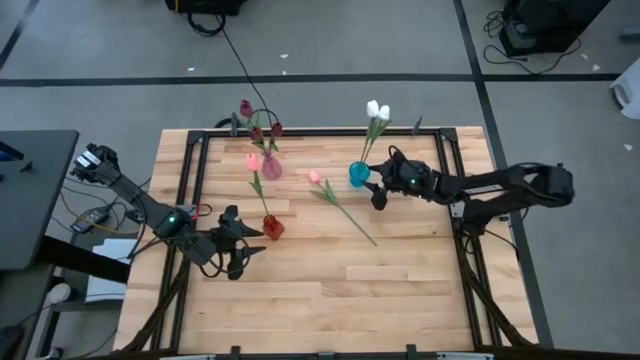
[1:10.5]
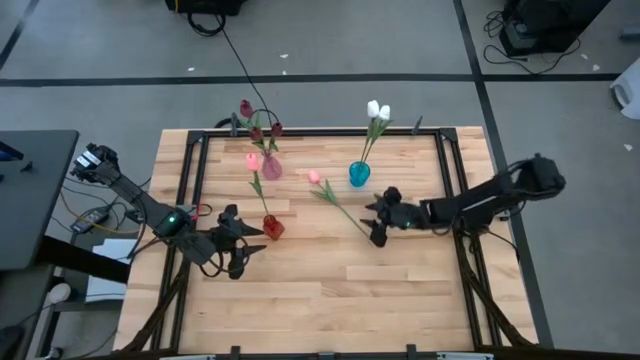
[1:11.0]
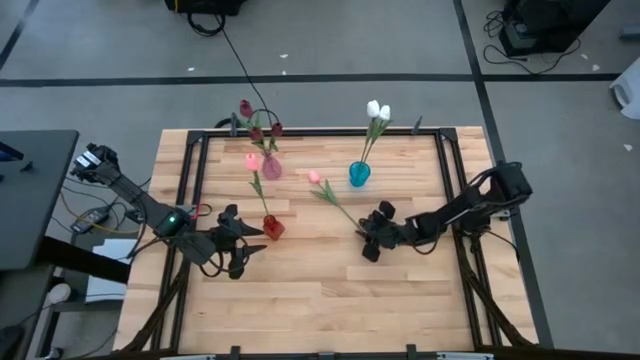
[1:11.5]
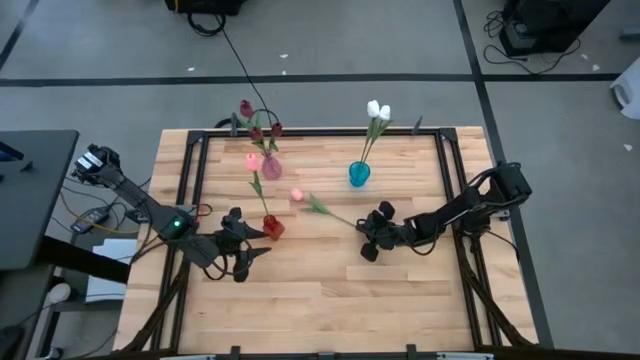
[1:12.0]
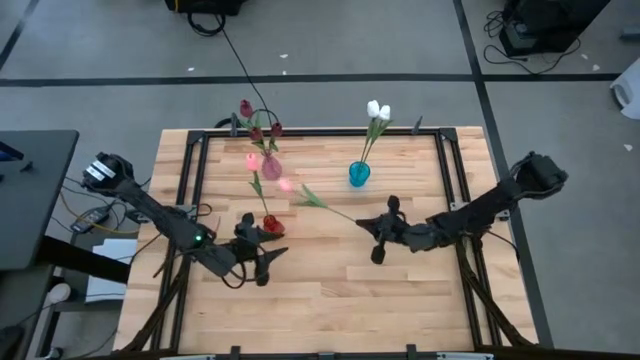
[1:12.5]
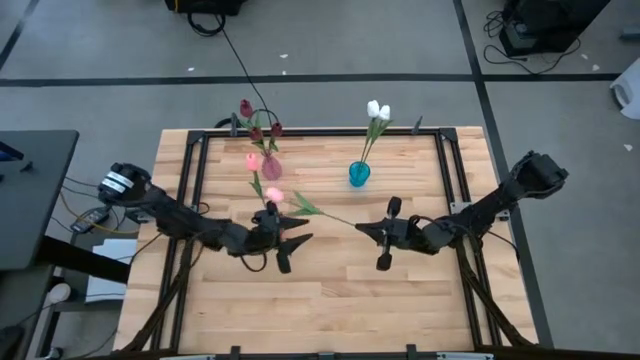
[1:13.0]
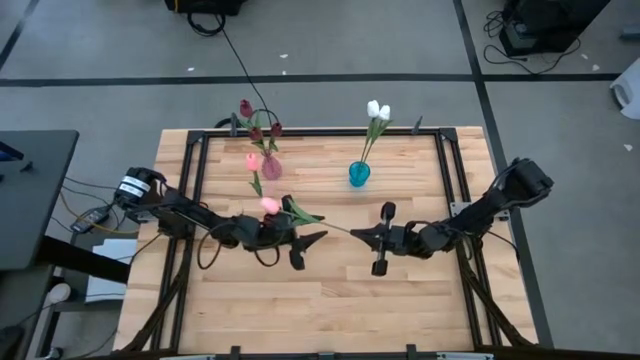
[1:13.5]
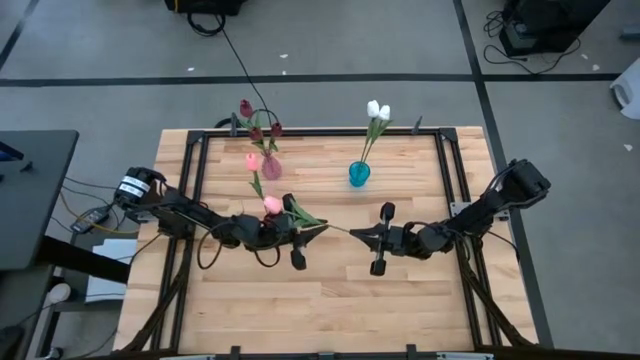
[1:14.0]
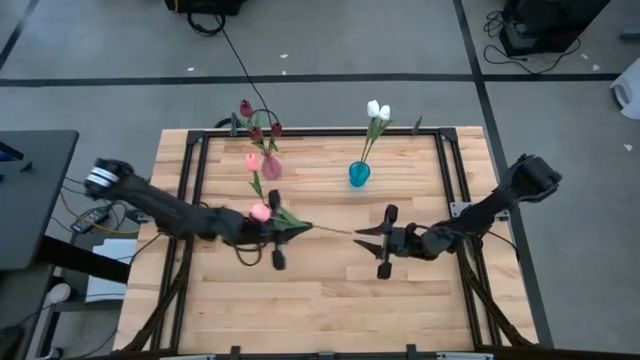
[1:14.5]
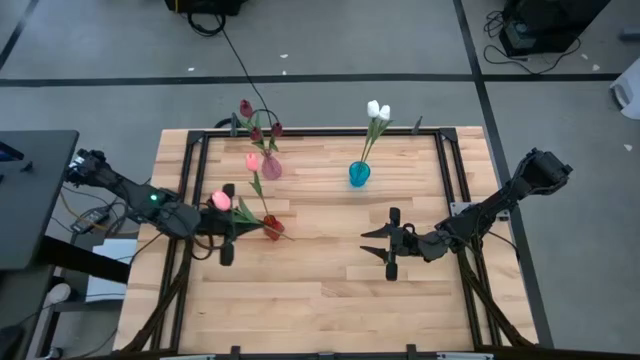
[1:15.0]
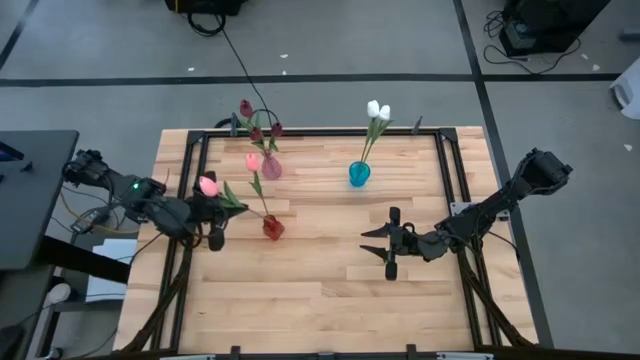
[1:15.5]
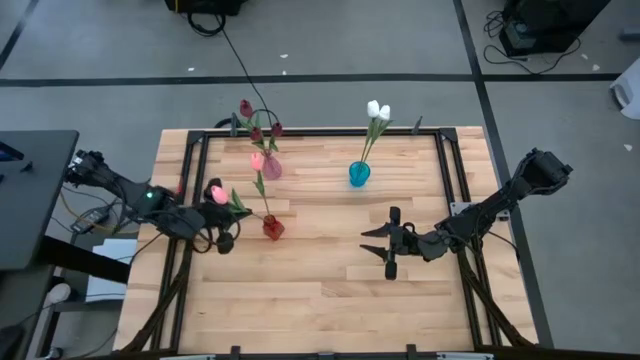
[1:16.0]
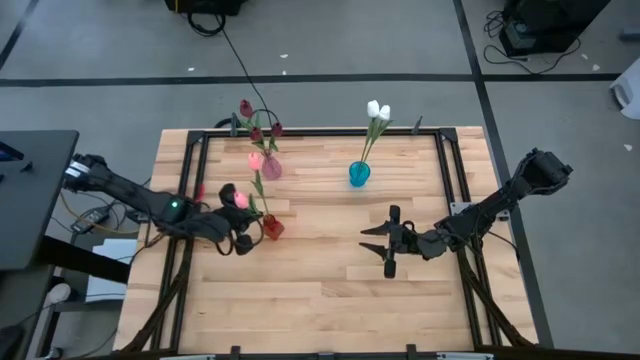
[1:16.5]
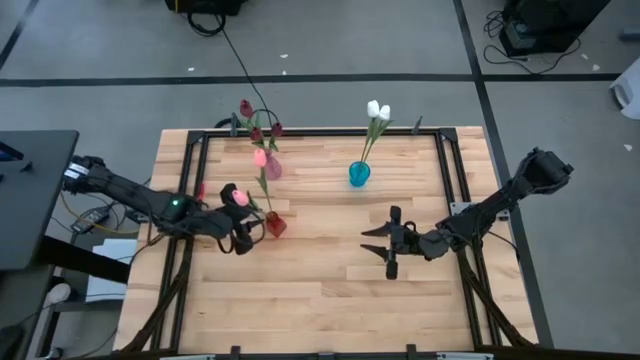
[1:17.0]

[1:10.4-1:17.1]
Task: Sort flowers into vase by color
Put the pink tulip into the red vase

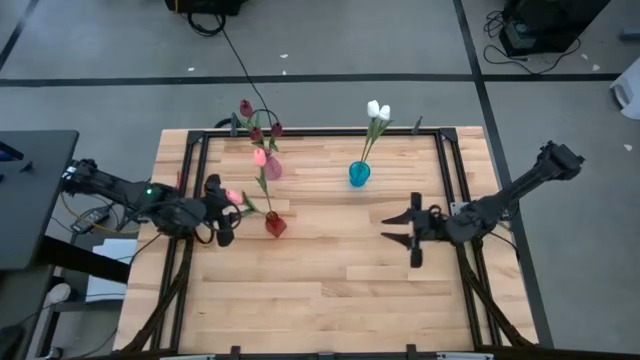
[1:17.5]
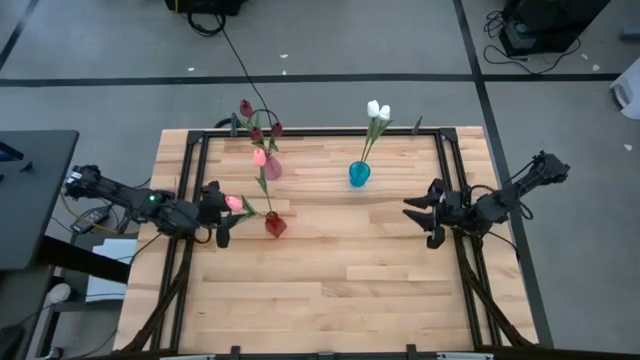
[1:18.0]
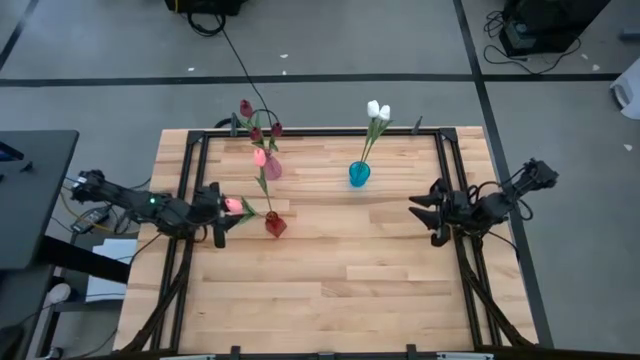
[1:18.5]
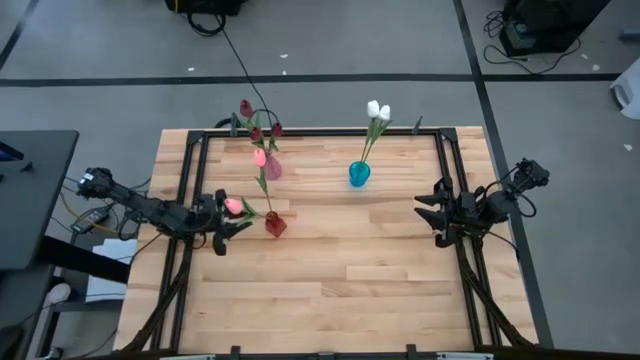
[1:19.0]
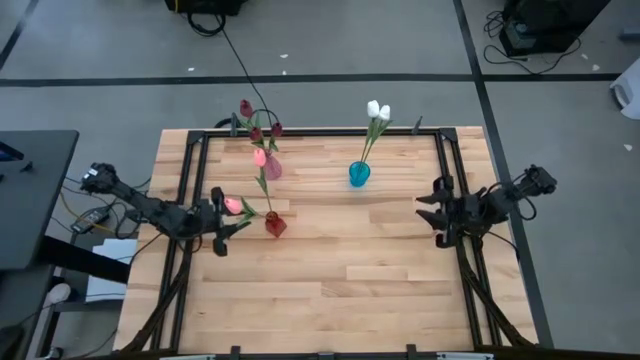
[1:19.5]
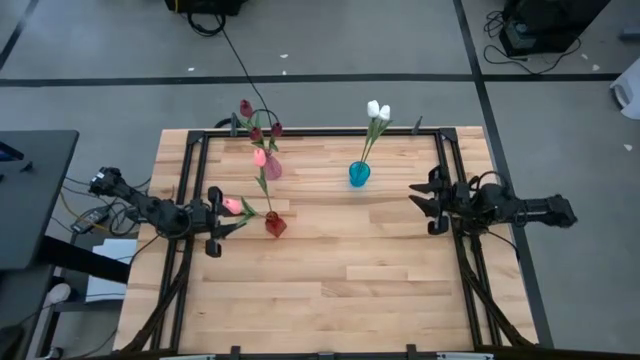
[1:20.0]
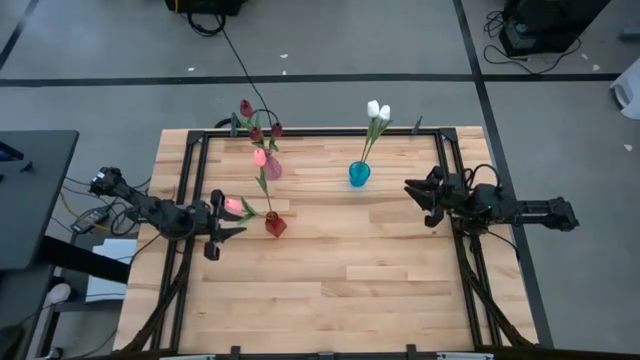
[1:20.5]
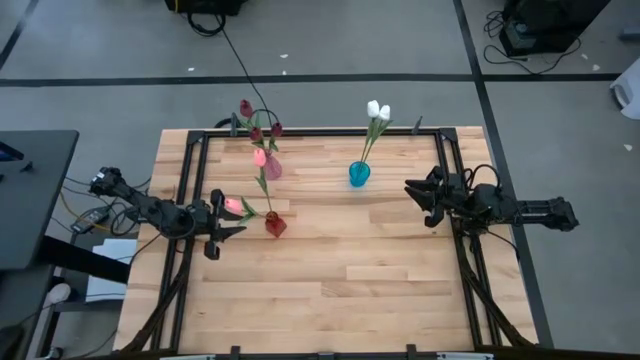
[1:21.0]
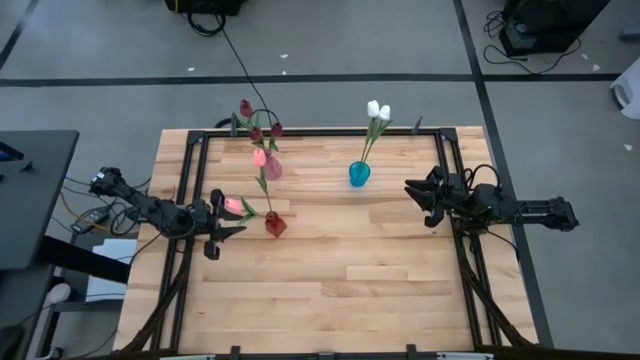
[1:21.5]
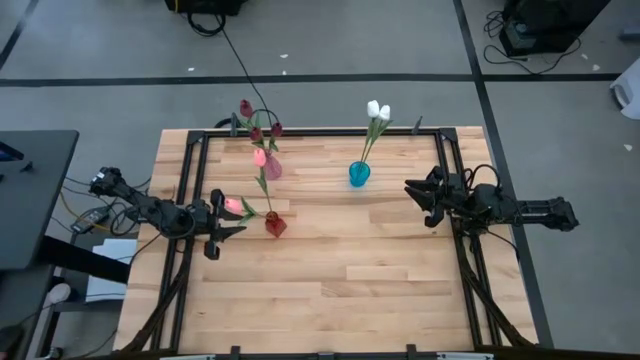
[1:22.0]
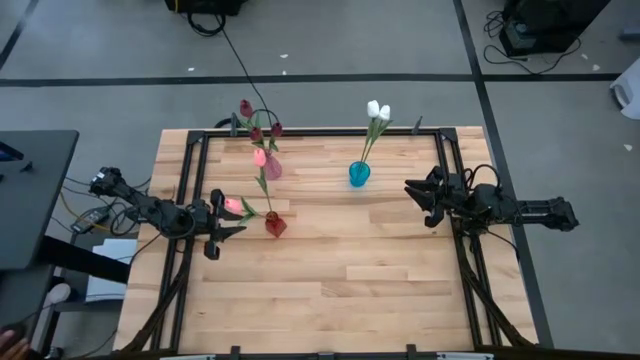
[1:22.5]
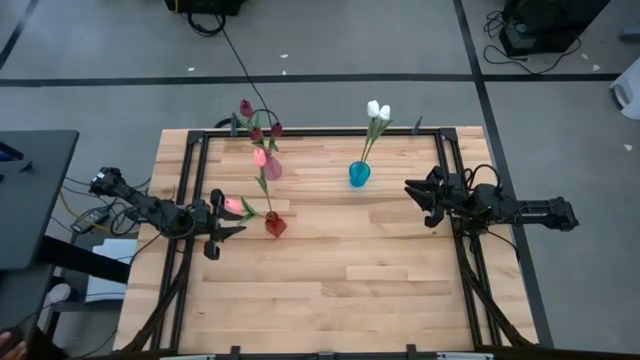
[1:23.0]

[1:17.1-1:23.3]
Return to Home Position

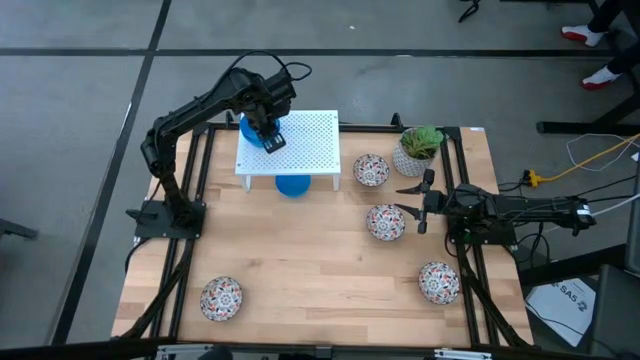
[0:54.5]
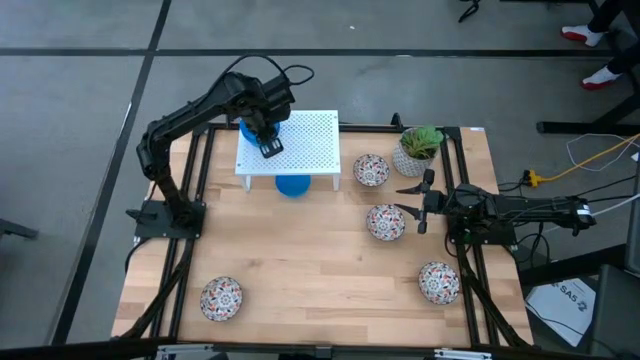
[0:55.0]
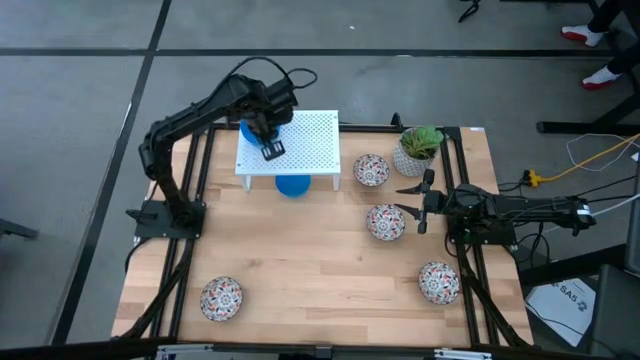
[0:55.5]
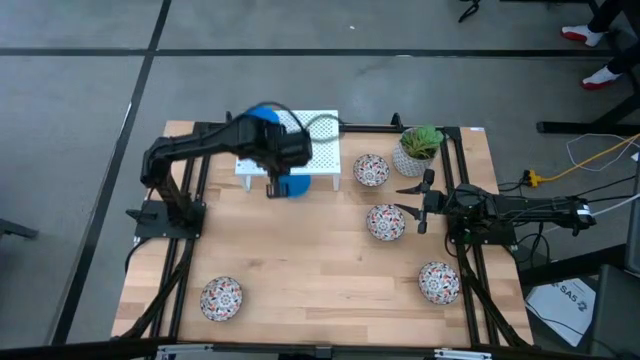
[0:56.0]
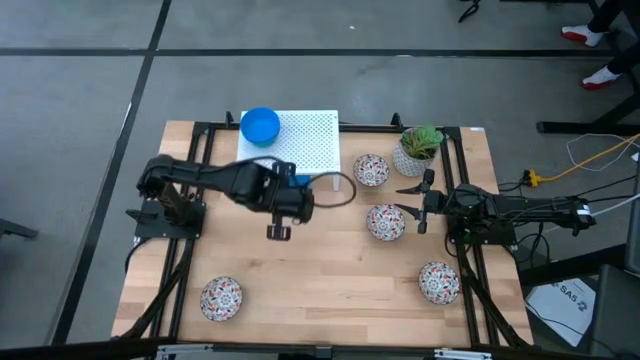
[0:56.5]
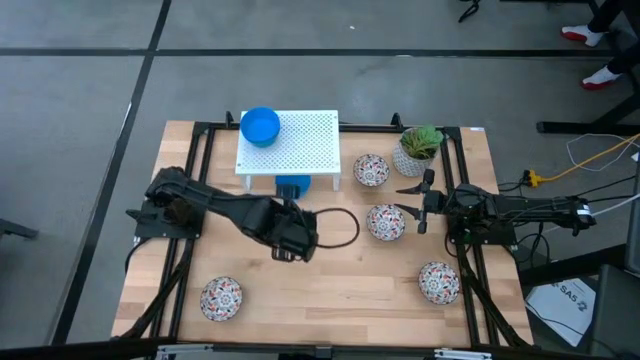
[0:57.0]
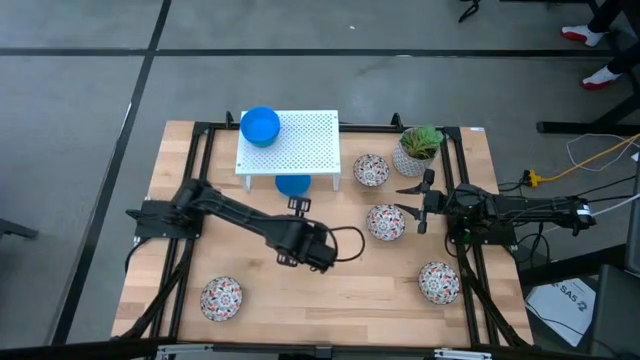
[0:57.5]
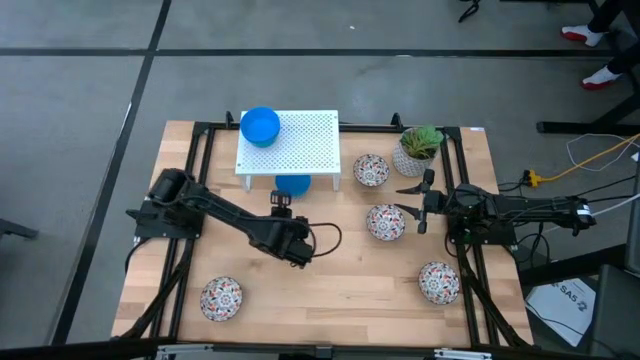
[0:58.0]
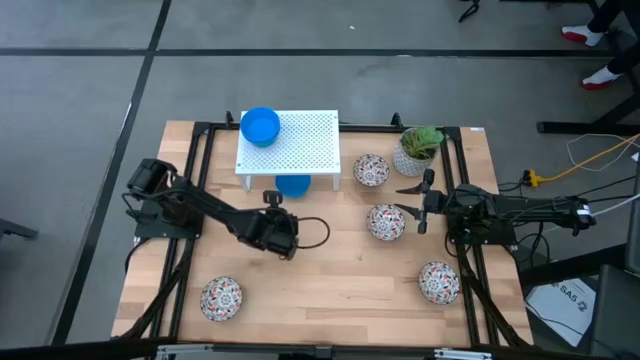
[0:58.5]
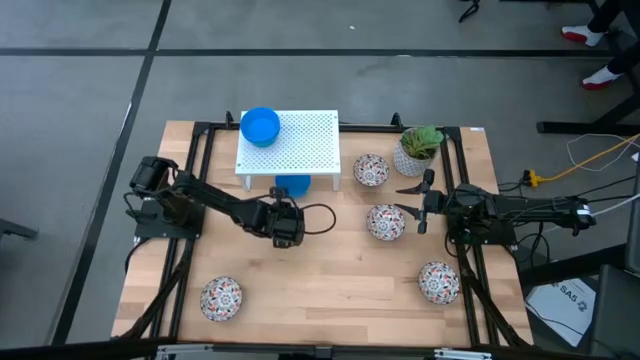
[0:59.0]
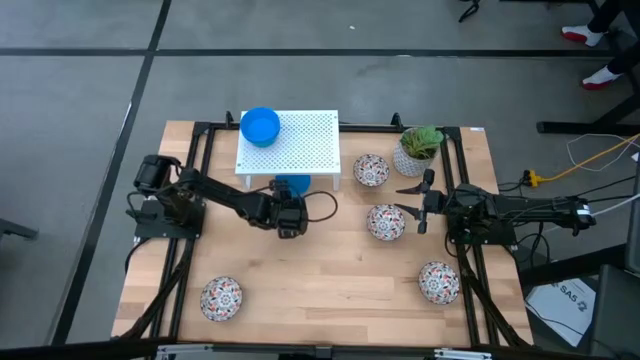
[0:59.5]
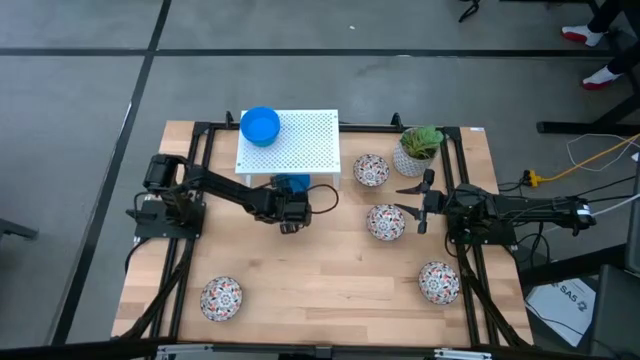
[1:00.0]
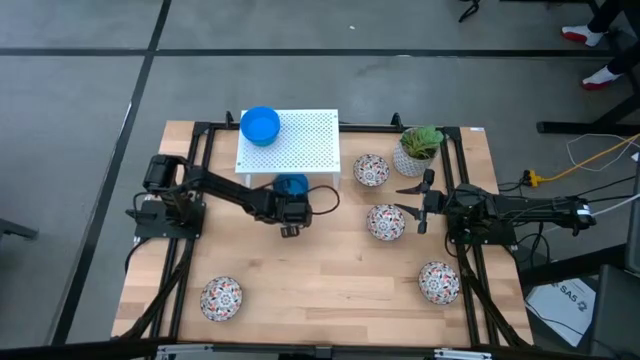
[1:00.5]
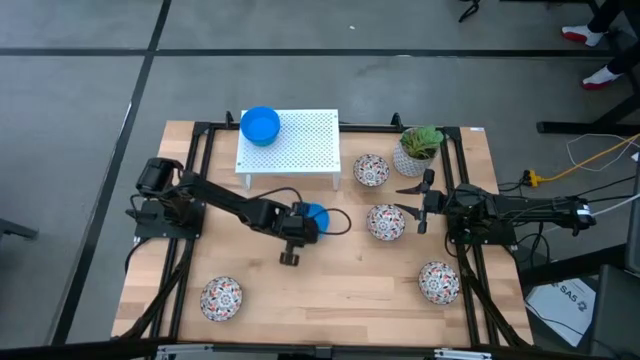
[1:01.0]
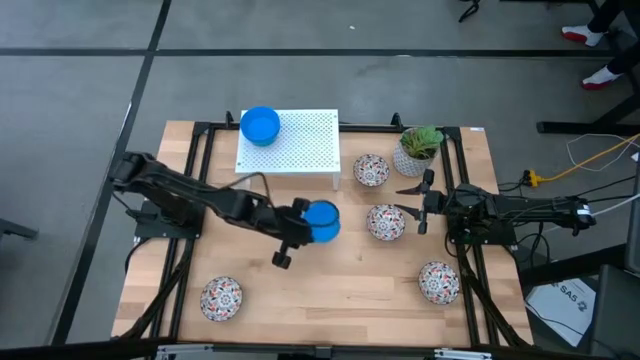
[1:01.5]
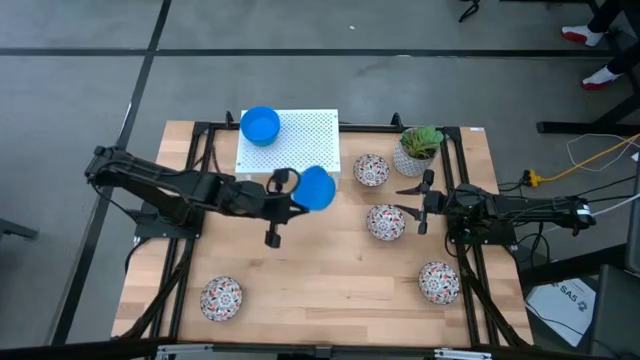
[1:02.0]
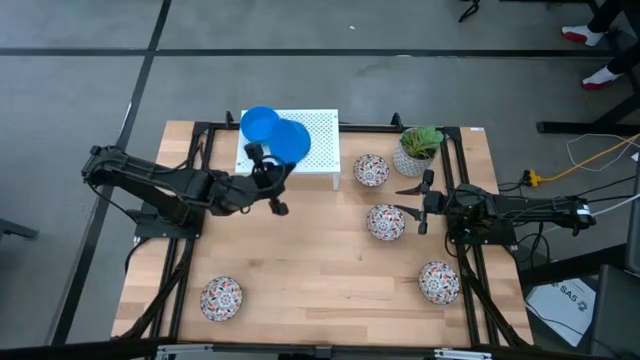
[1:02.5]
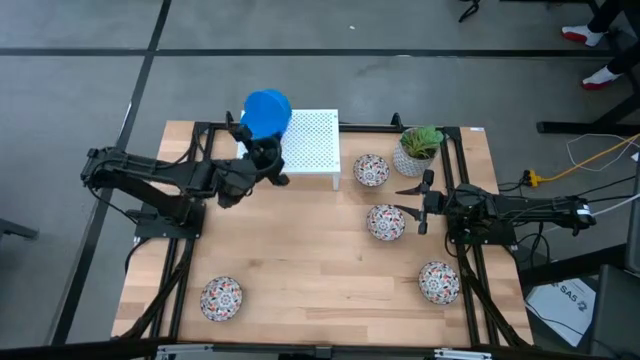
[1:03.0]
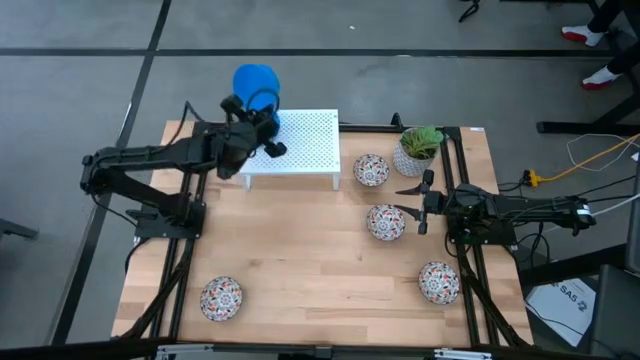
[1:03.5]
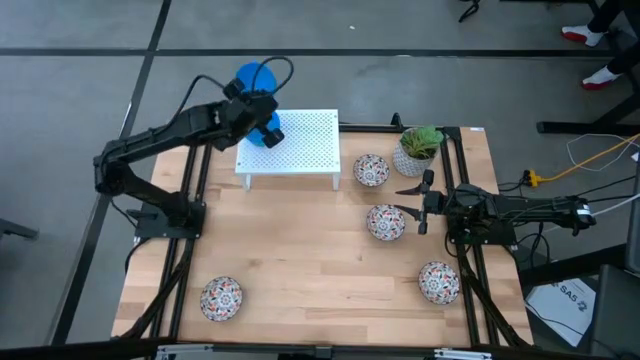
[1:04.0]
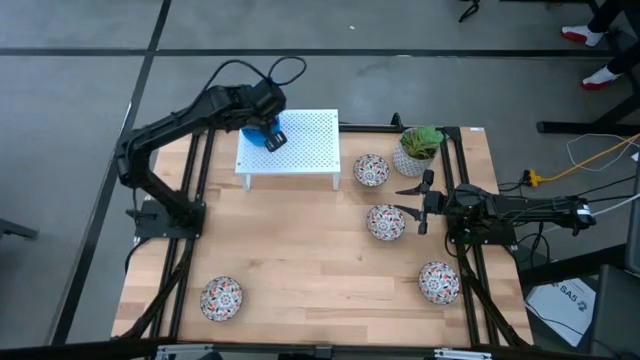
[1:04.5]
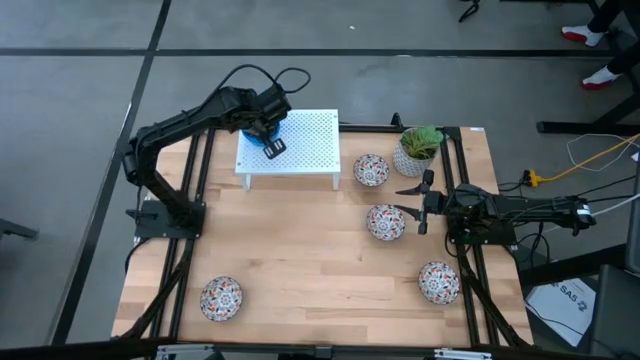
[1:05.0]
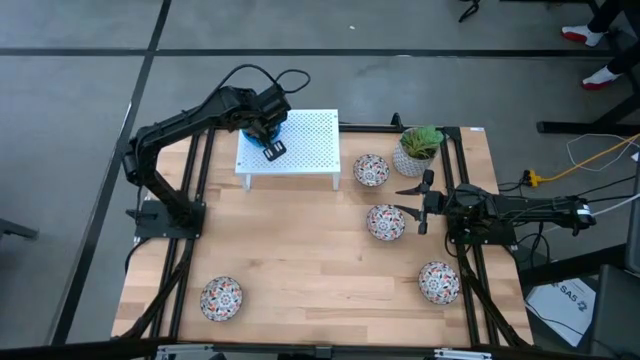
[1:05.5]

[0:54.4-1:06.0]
Task: Pick & Place Mini bowls
Stack the blue bowl on top of the stacked blue bowl on the shelf
